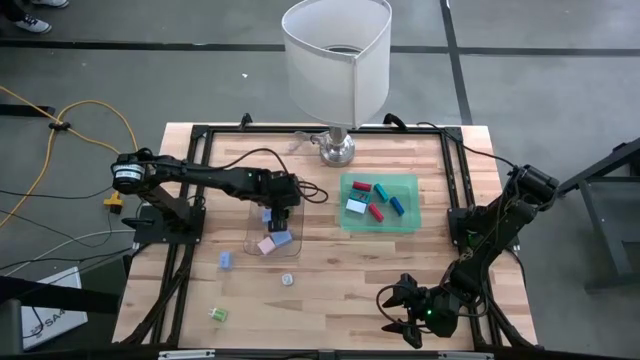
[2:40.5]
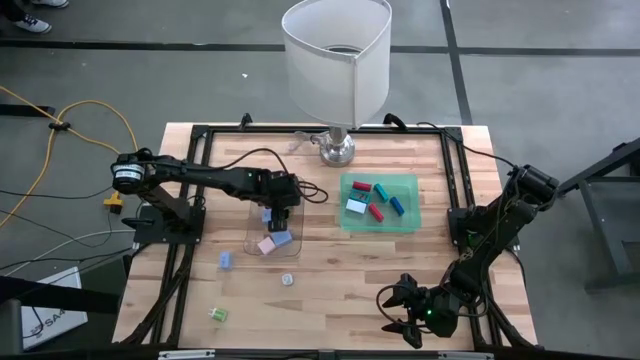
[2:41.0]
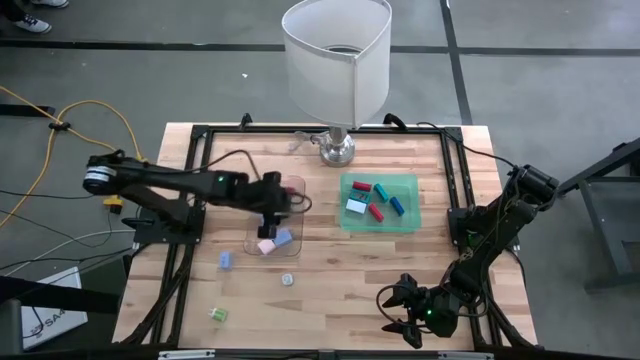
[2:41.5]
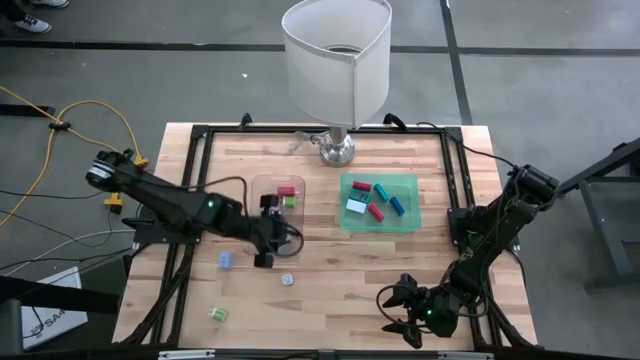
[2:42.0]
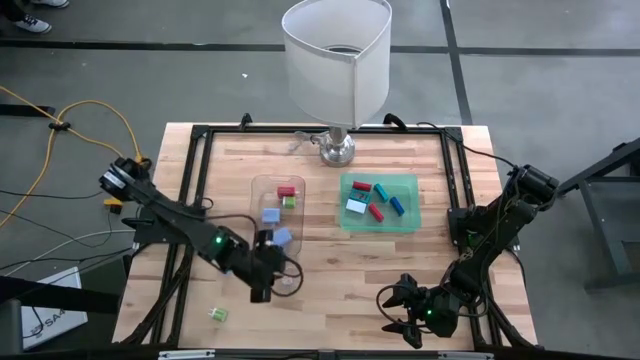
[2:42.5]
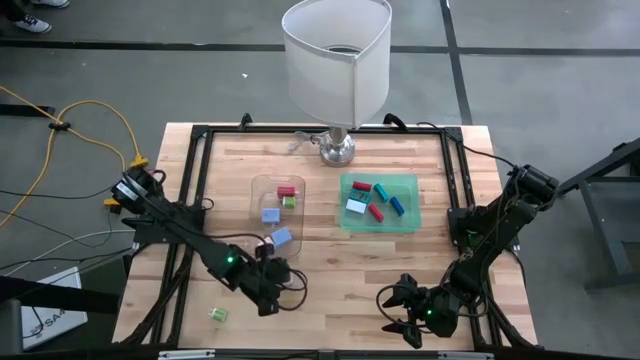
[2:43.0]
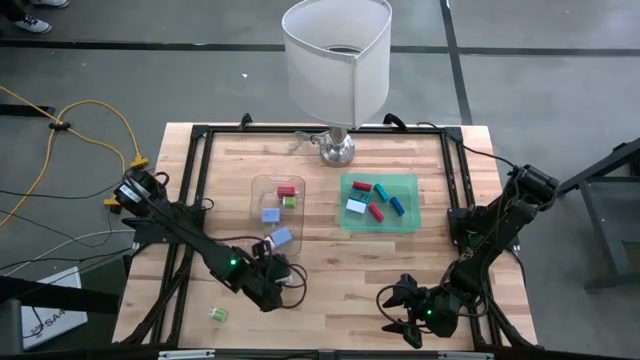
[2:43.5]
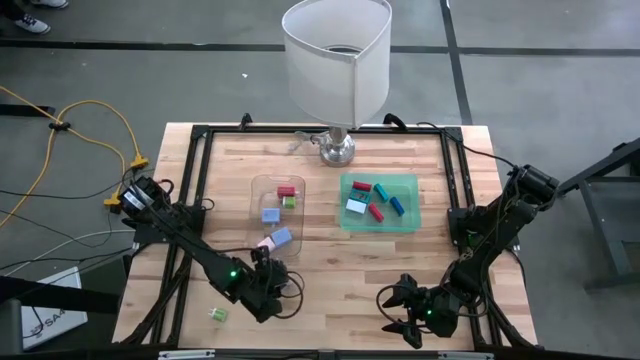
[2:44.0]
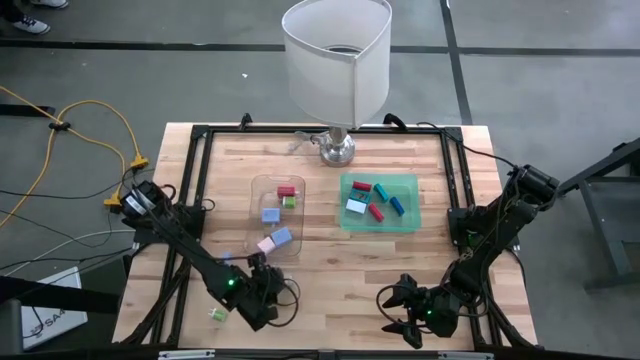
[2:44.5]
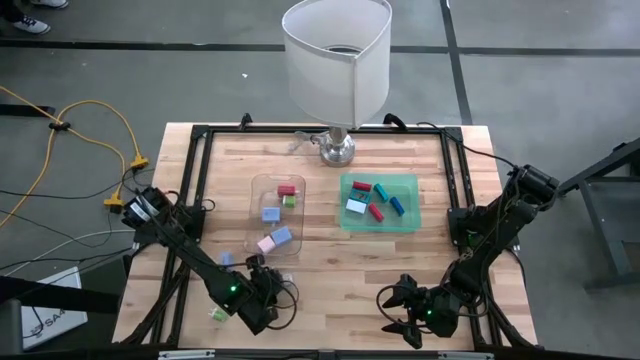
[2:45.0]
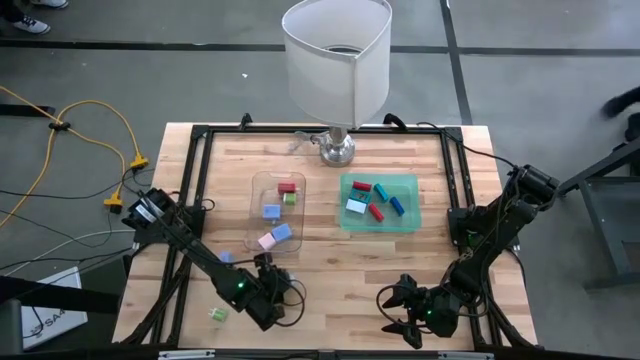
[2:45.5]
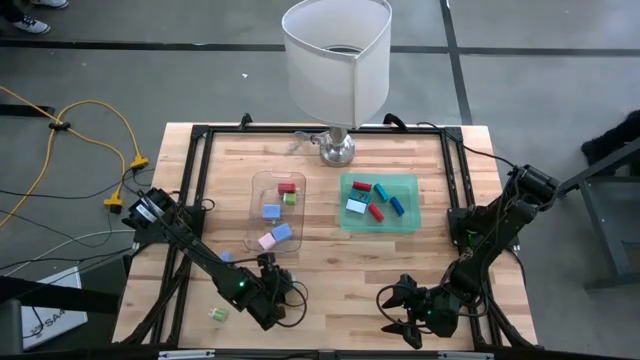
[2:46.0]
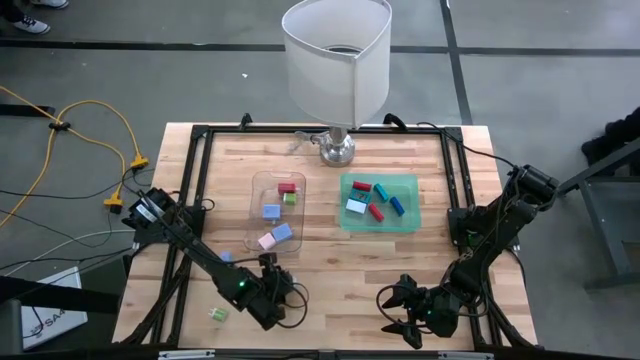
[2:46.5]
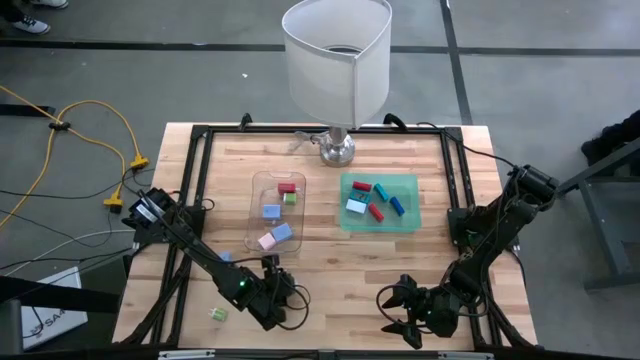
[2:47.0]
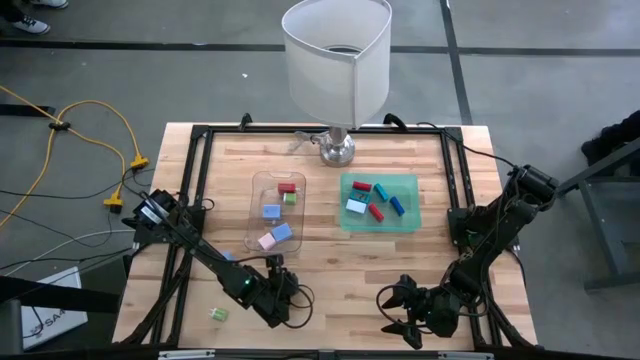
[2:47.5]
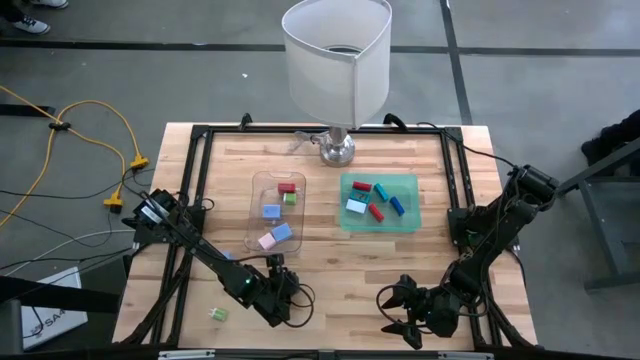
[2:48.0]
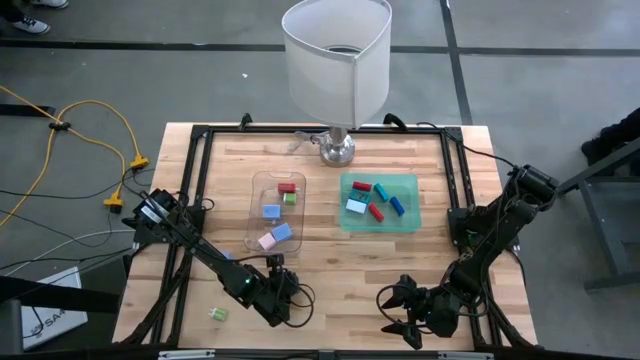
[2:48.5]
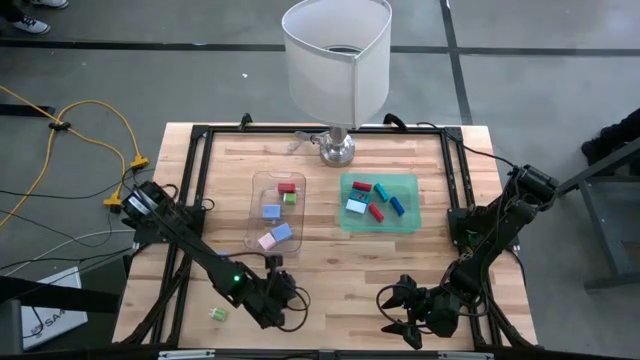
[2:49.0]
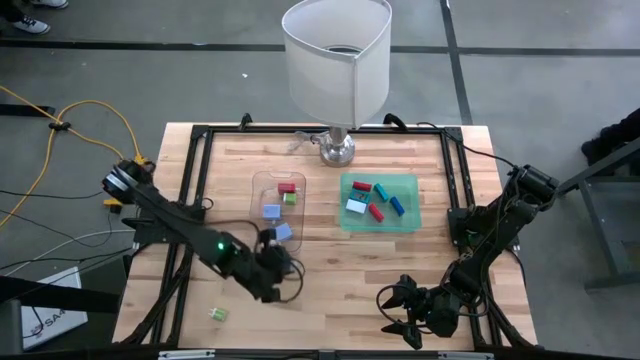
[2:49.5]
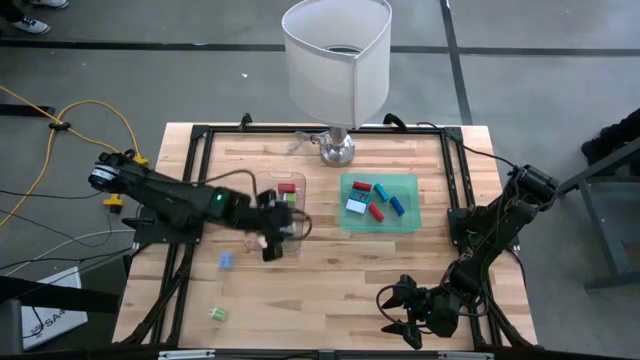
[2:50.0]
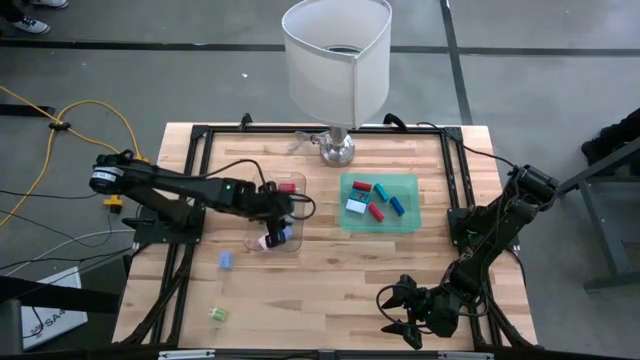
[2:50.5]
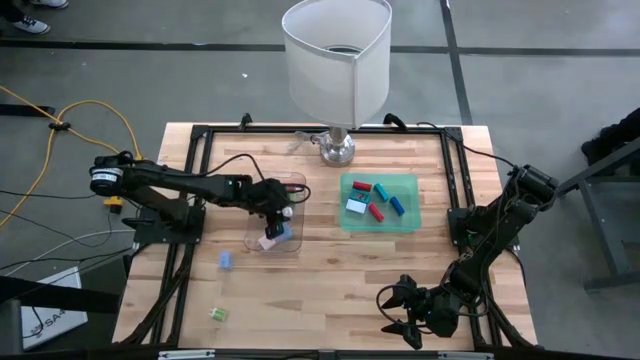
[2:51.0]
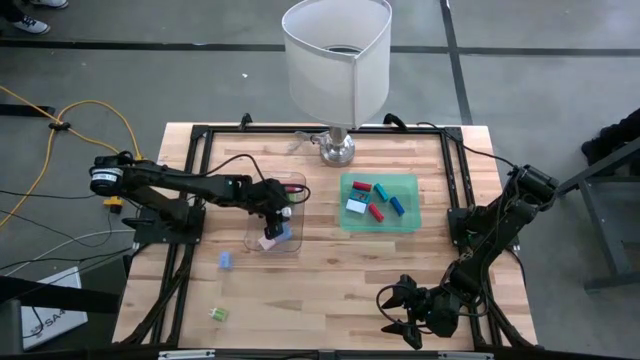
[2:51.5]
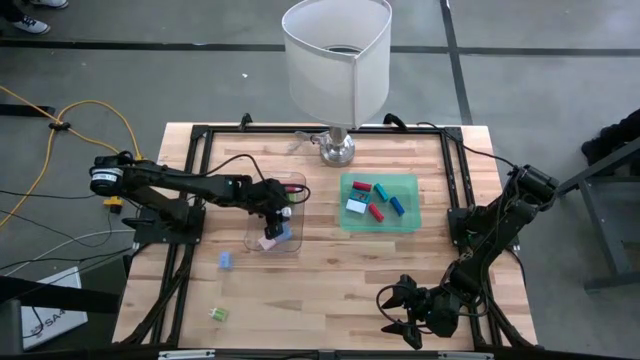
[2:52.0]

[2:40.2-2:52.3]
Task: Pick & Place Office items
Put the purple charger adapter into the transparent bin

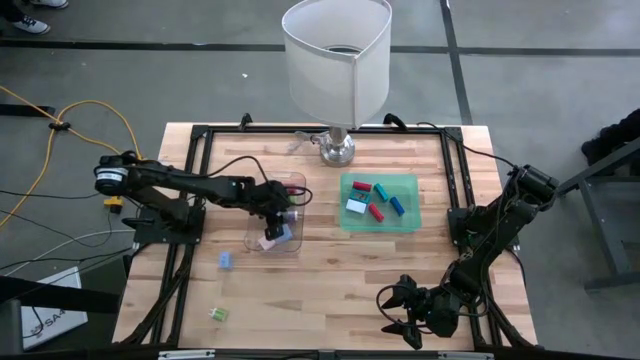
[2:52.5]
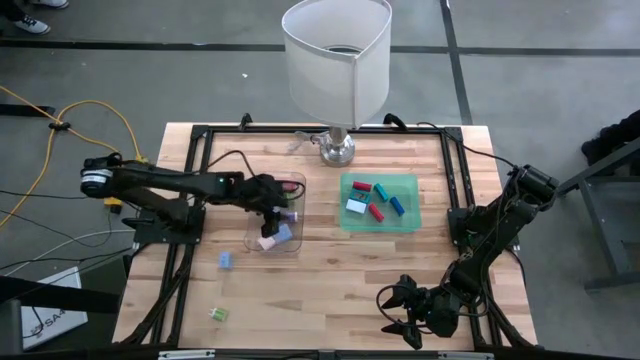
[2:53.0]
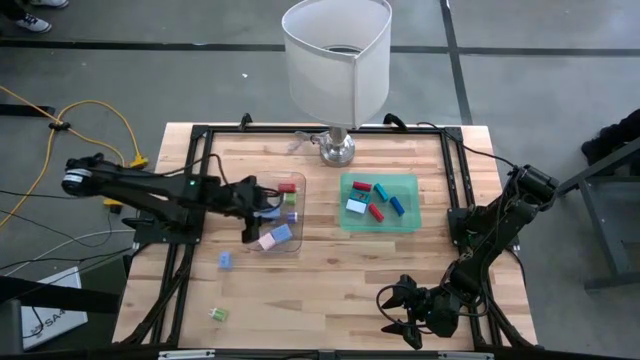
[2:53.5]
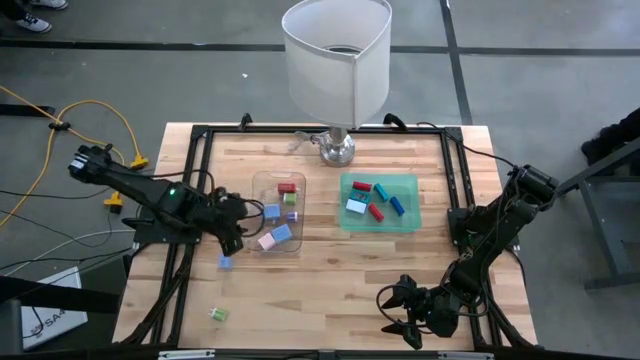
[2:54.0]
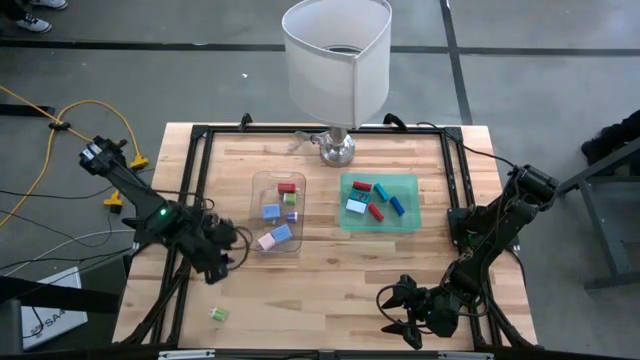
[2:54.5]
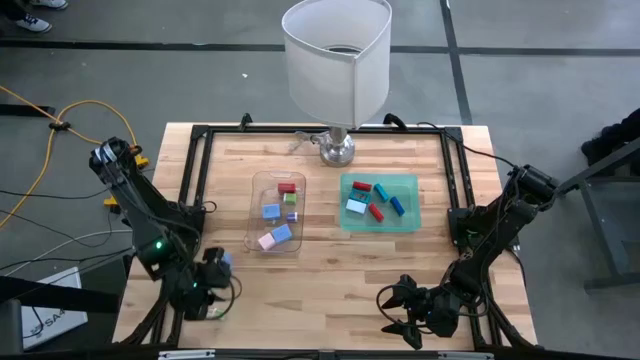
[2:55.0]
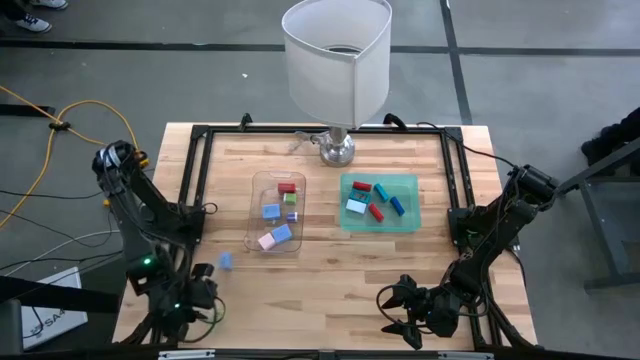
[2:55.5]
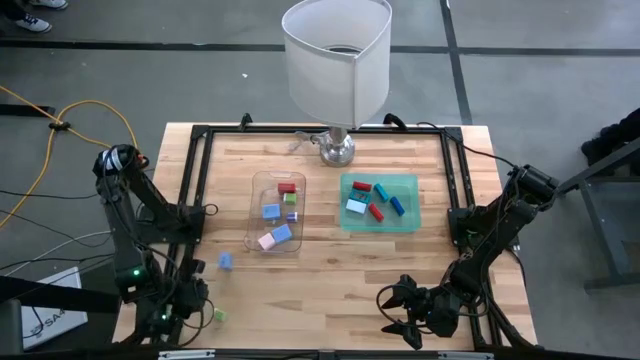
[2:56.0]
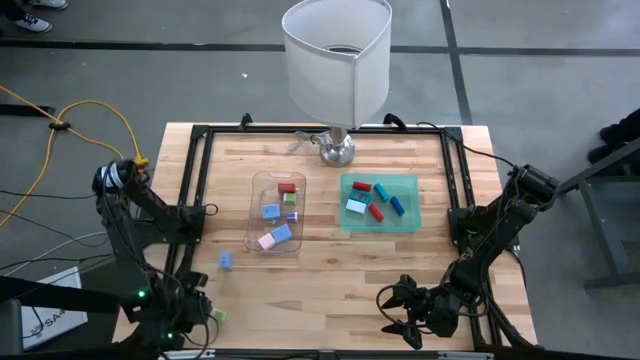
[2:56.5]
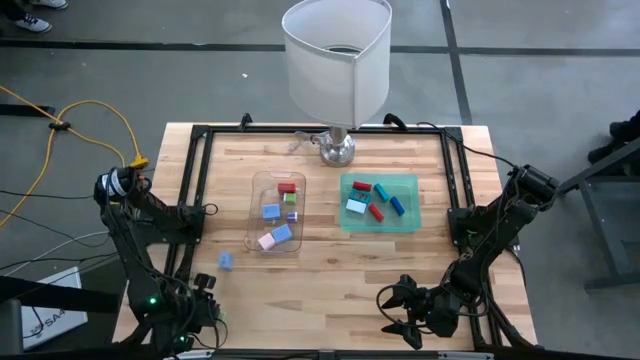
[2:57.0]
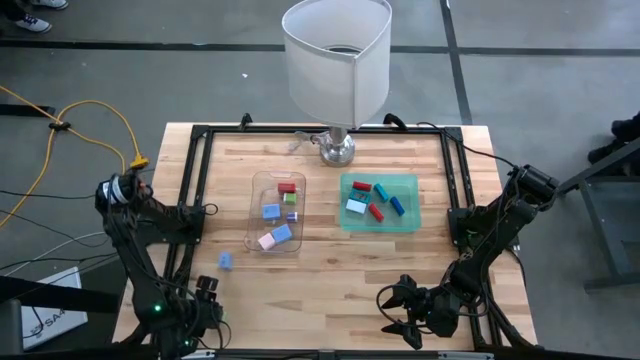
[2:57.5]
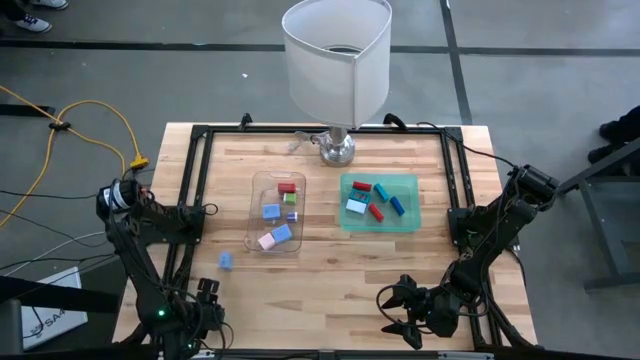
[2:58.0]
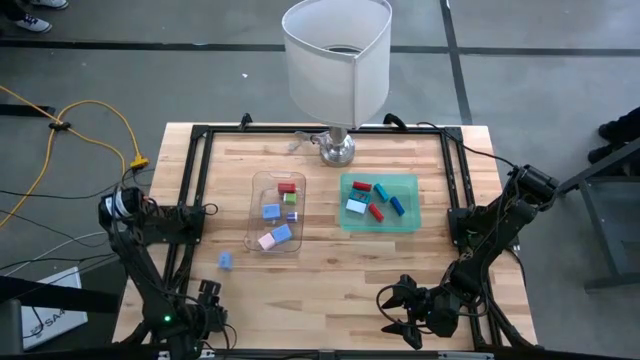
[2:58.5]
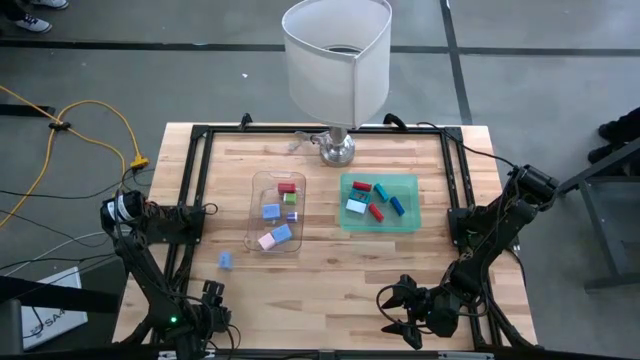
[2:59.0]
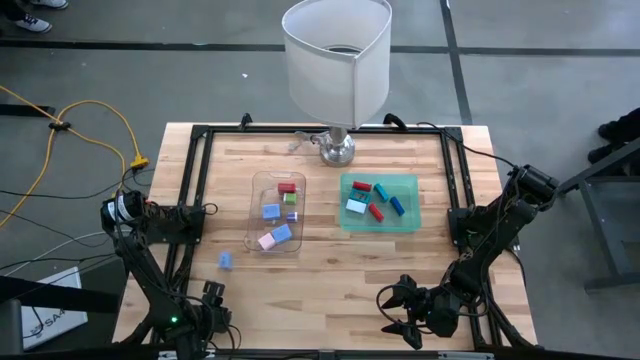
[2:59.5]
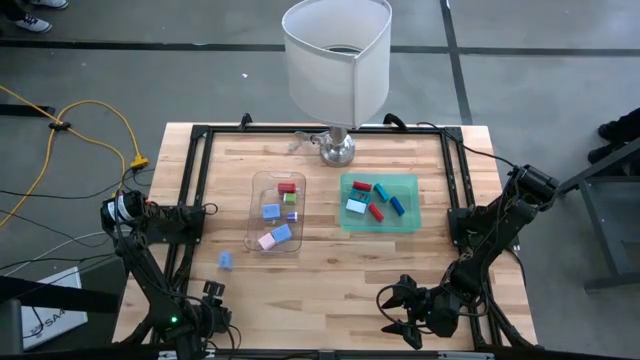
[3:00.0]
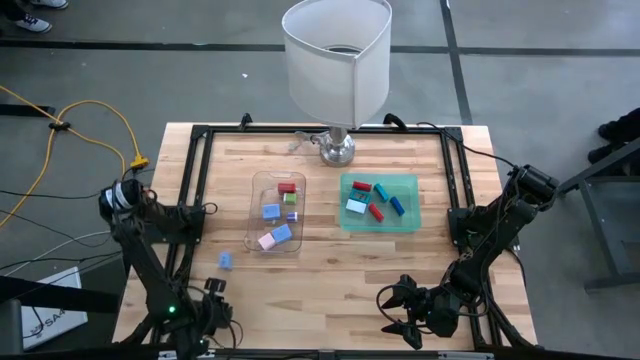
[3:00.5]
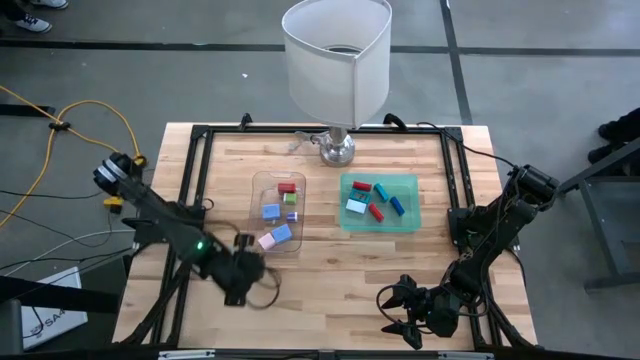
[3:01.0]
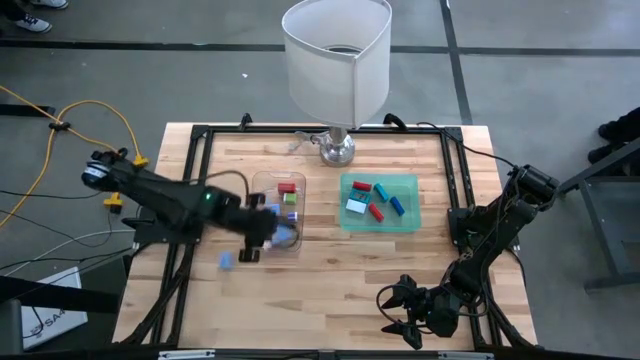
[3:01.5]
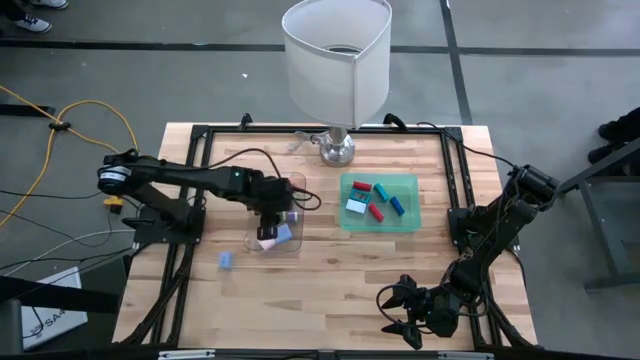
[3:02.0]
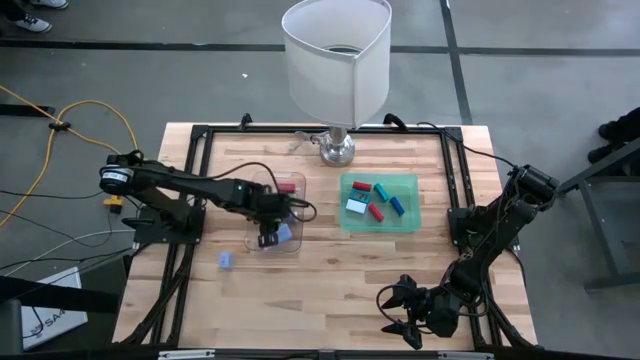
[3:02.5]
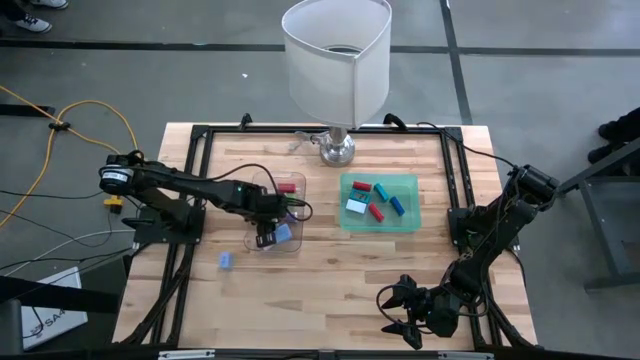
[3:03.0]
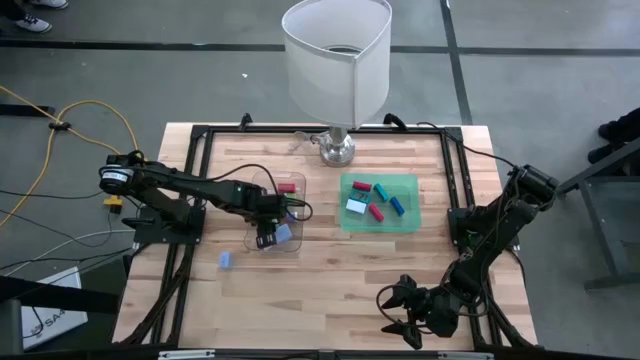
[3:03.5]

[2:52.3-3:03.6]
Put the green charger adapter into the transparent bin
